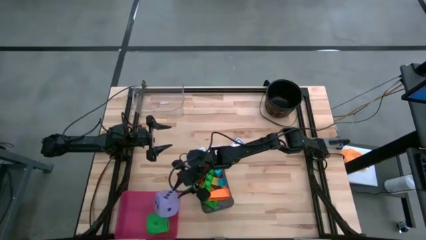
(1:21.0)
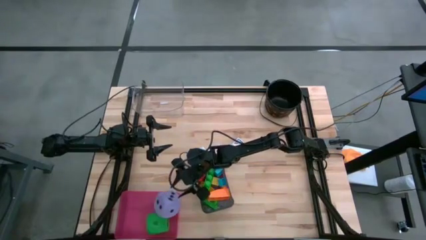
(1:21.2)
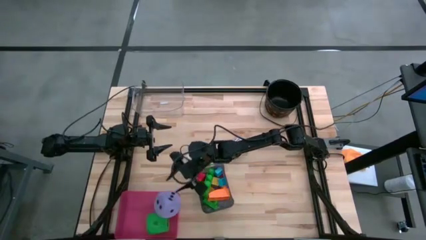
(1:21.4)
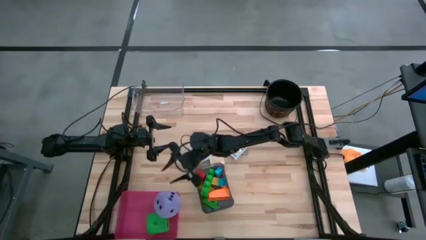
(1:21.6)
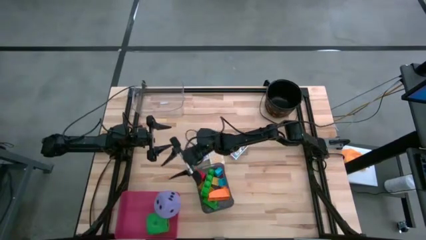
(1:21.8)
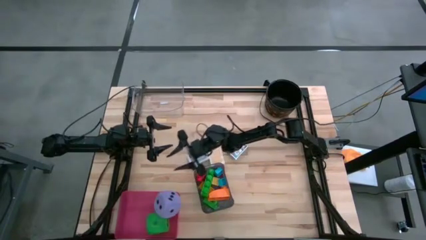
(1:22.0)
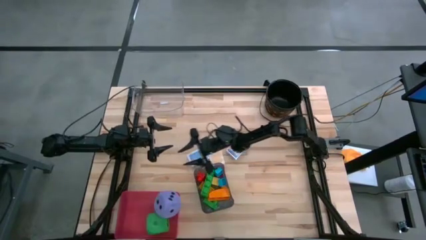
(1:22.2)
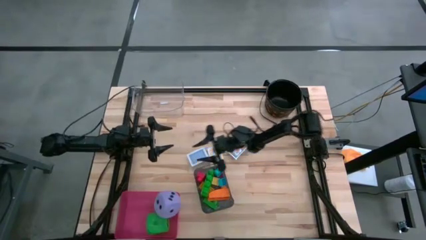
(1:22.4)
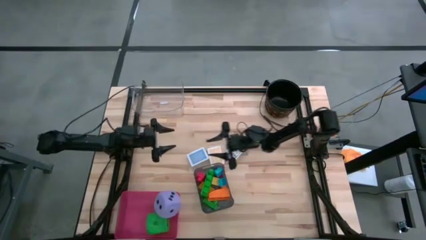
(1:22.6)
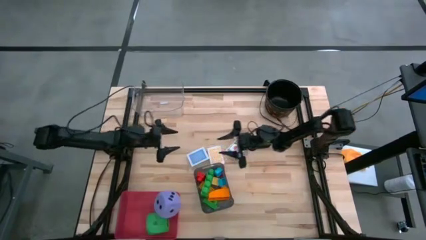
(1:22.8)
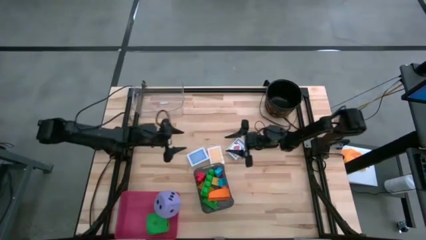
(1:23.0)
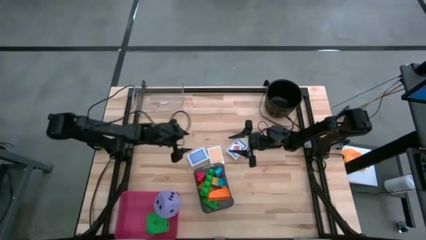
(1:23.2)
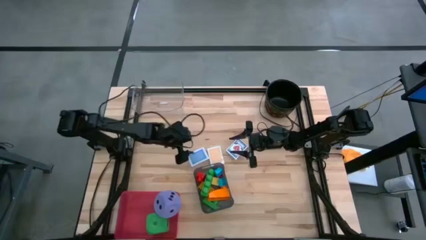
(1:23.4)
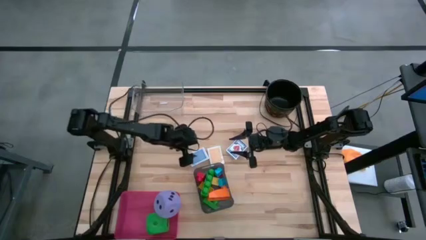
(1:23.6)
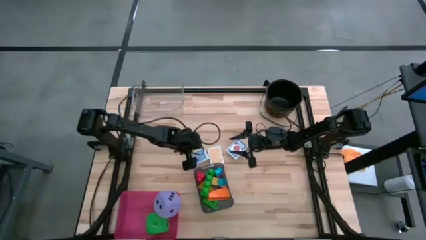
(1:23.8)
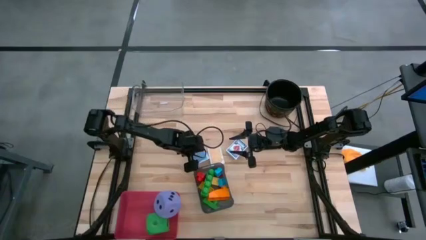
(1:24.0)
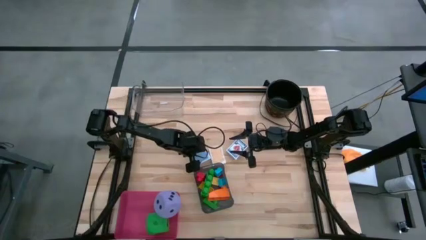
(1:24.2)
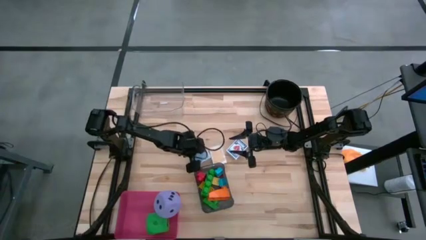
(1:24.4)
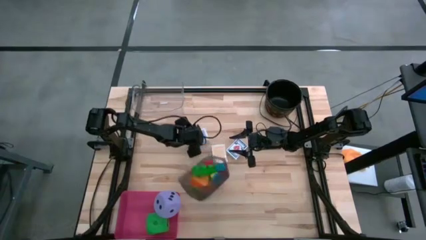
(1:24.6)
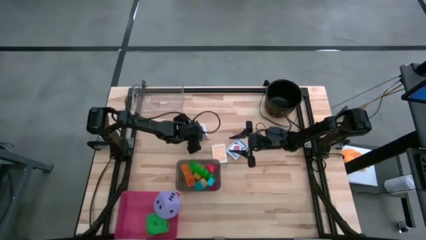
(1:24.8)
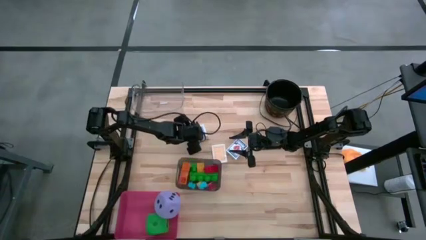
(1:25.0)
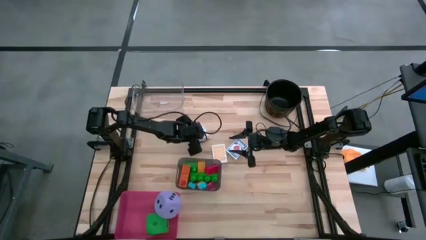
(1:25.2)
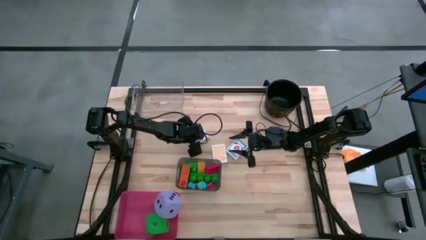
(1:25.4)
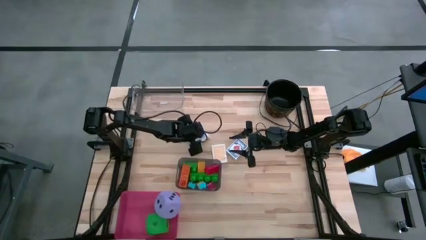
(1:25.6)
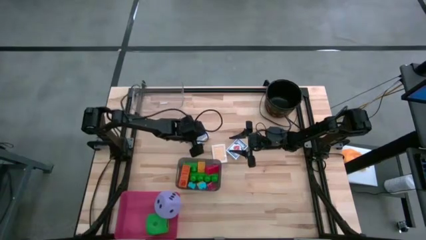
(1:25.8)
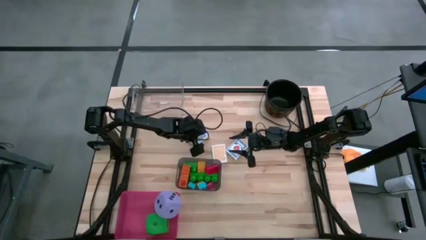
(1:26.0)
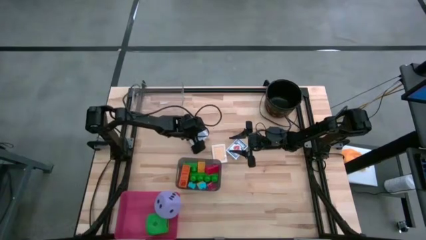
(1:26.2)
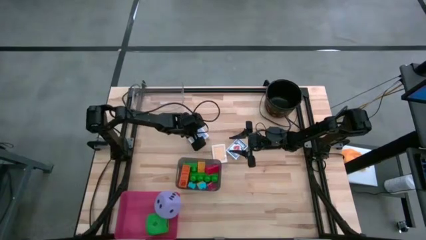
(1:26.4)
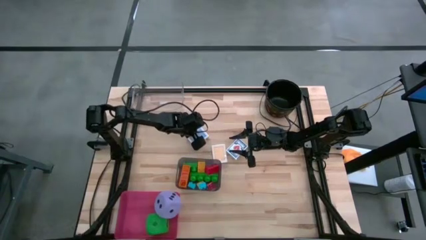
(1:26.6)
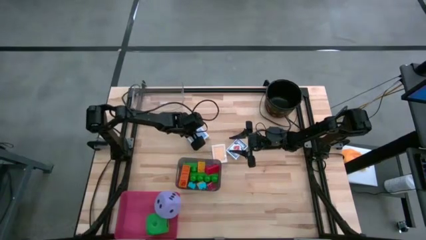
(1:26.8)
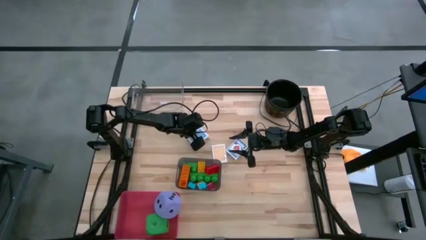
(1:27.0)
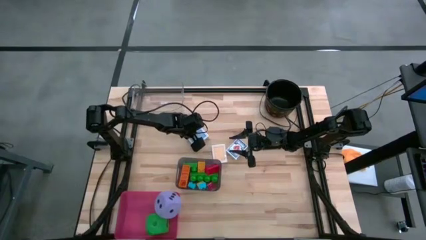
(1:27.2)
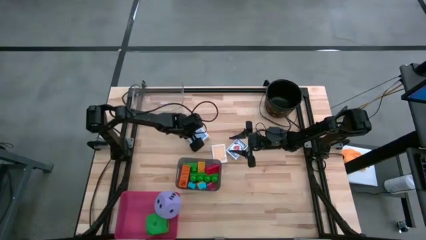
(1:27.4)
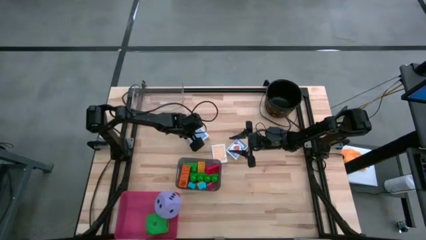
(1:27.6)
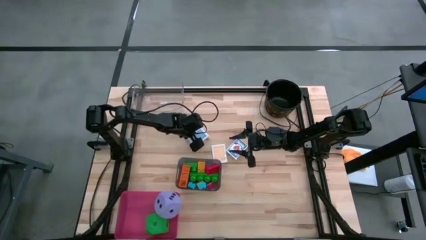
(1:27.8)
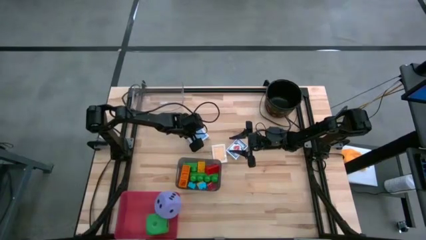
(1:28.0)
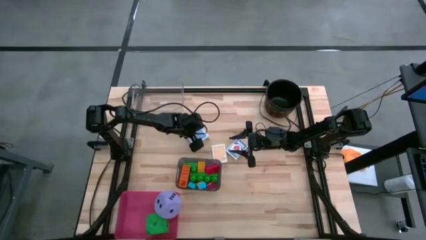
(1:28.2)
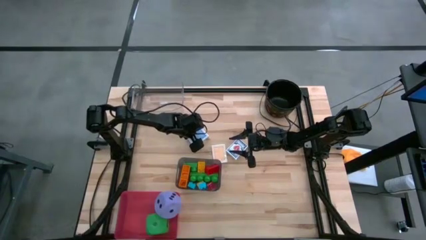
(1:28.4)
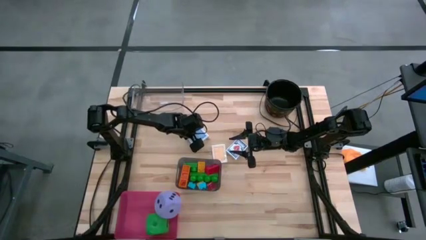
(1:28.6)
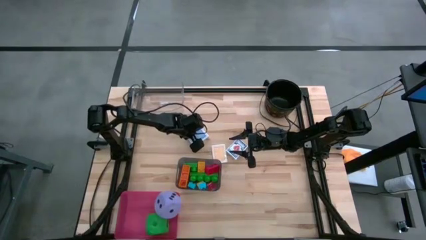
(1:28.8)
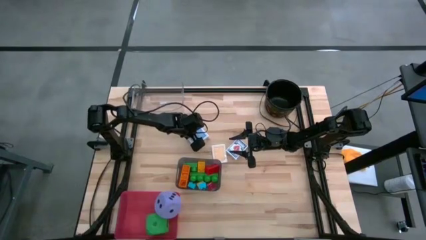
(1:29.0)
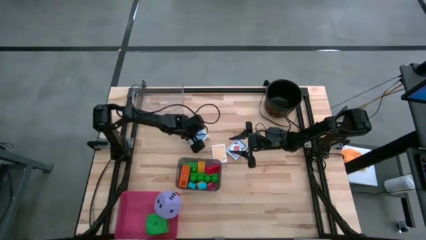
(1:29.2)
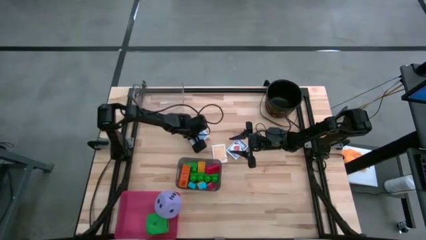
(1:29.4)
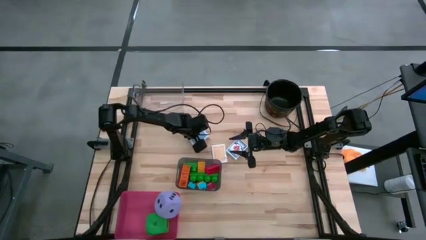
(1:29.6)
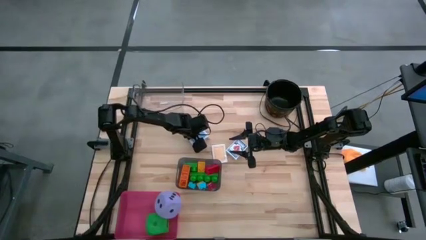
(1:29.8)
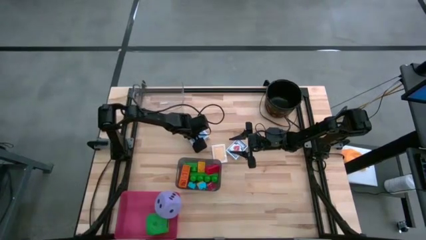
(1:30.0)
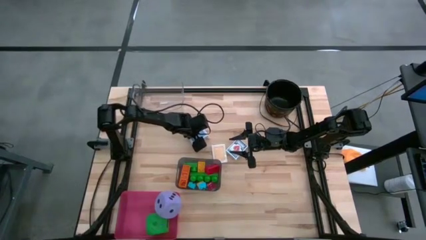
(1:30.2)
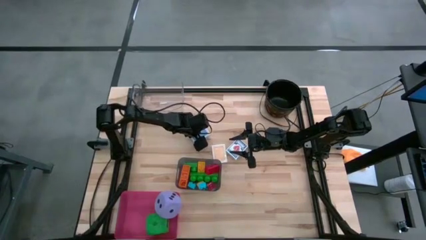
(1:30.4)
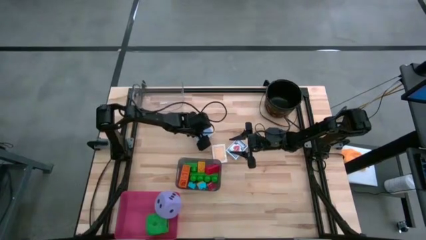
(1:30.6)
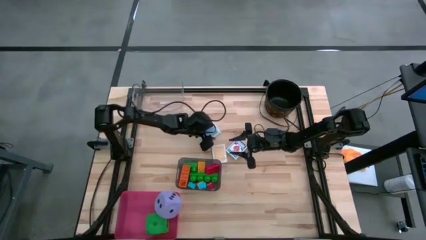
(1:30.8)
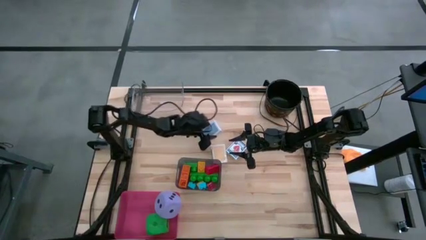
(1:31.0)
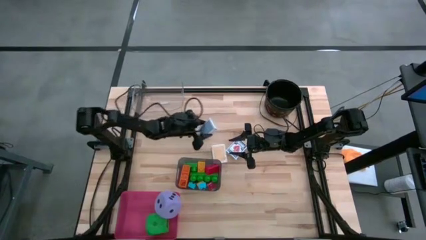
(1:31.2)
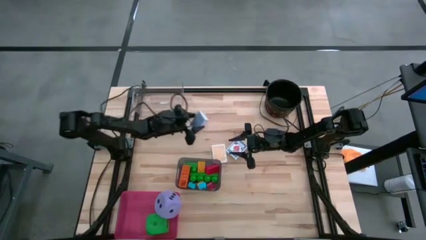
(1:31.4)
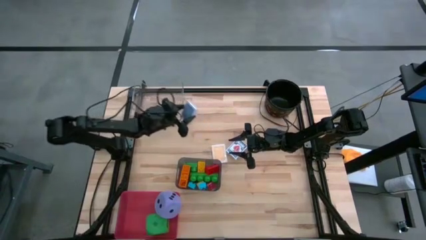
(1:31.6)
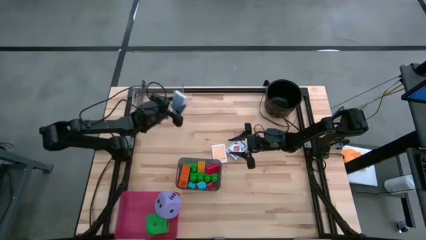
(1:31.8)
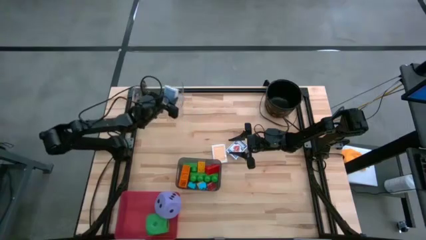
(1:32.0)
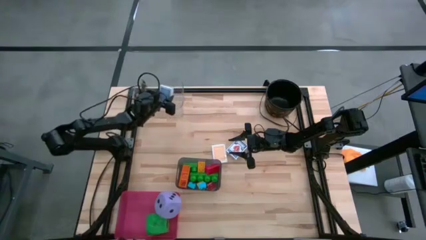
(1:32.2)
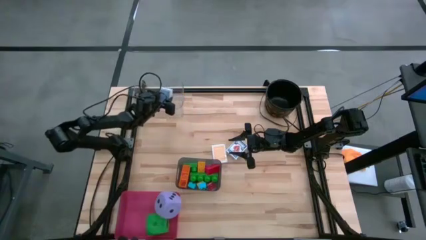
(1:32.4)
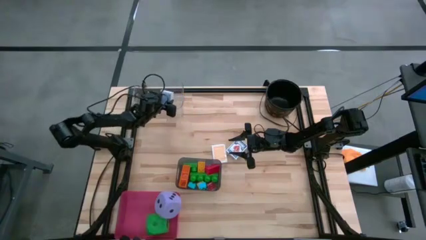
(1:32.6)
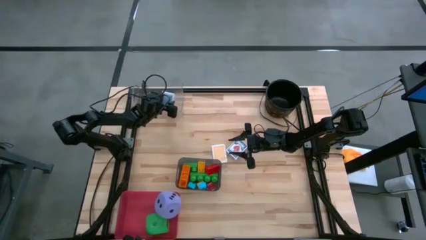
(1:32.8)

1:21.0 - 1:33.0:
Task: Pick & Place Toys
Put the blue playing card into the transparent bin

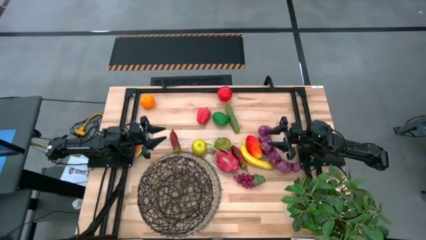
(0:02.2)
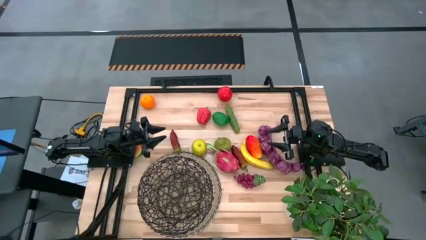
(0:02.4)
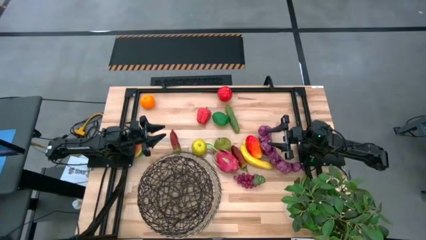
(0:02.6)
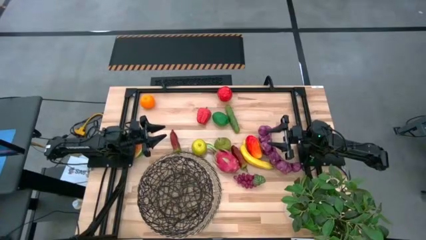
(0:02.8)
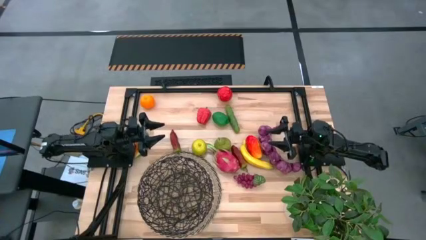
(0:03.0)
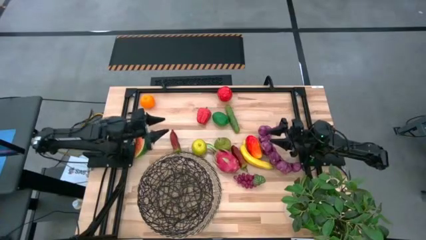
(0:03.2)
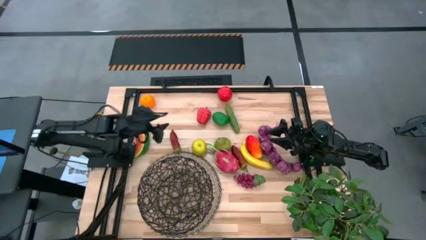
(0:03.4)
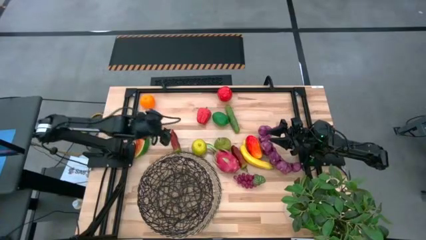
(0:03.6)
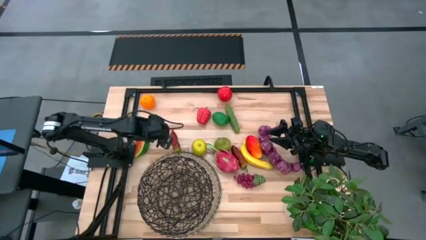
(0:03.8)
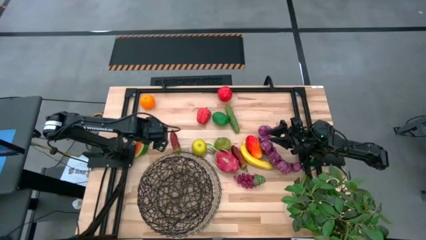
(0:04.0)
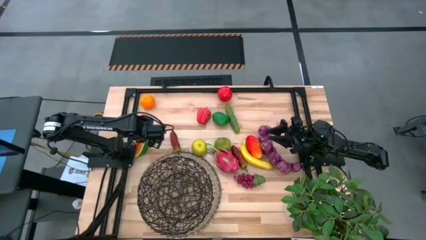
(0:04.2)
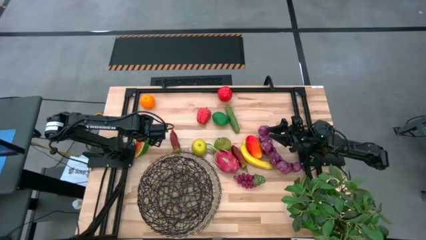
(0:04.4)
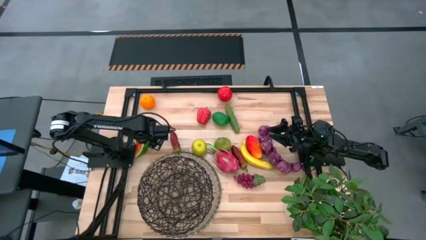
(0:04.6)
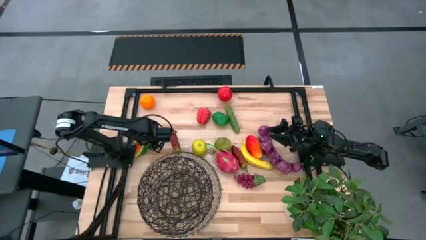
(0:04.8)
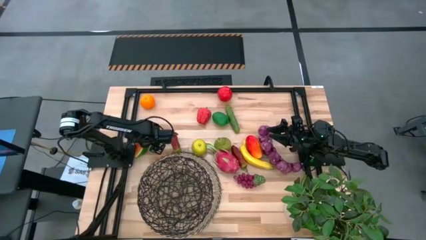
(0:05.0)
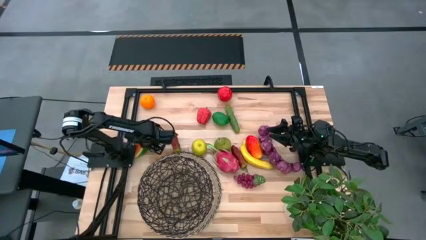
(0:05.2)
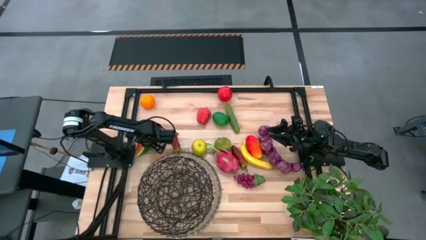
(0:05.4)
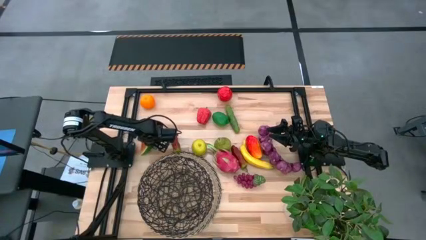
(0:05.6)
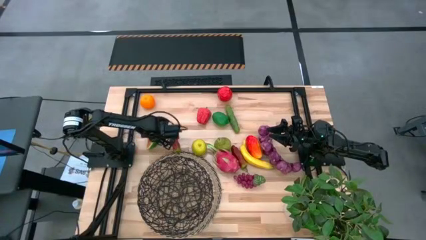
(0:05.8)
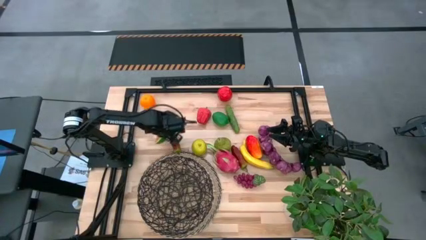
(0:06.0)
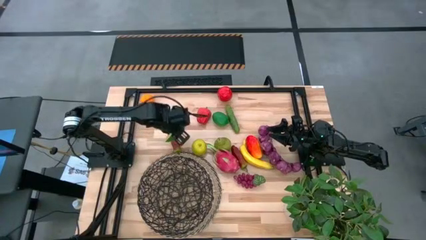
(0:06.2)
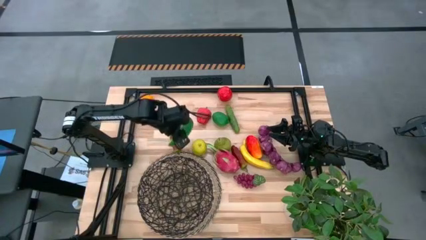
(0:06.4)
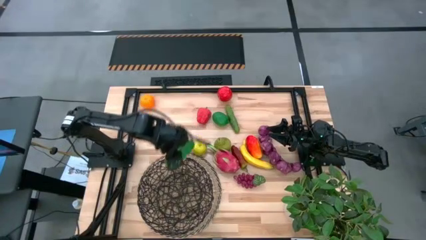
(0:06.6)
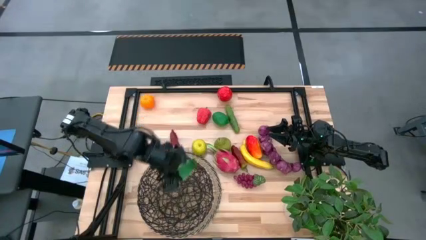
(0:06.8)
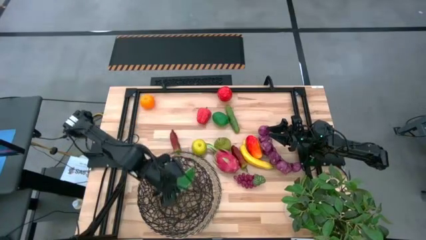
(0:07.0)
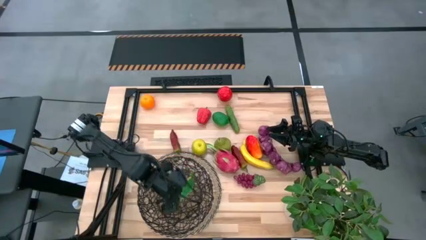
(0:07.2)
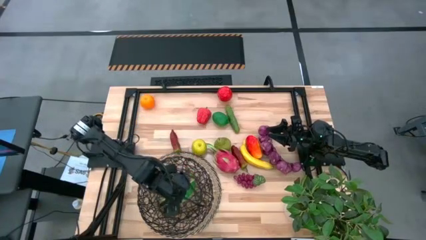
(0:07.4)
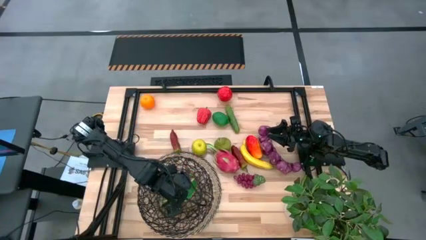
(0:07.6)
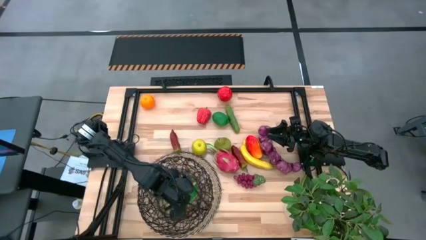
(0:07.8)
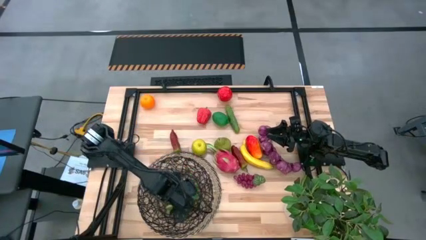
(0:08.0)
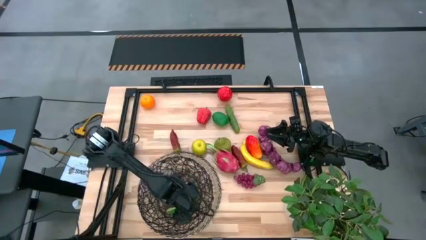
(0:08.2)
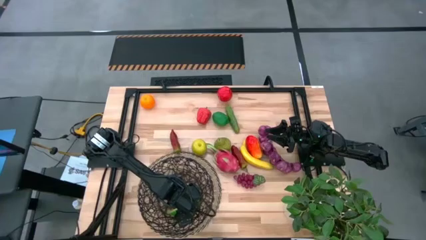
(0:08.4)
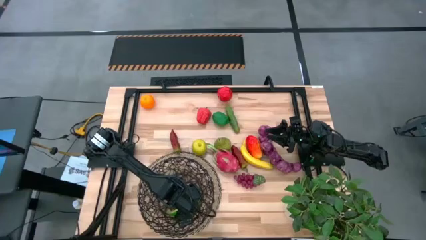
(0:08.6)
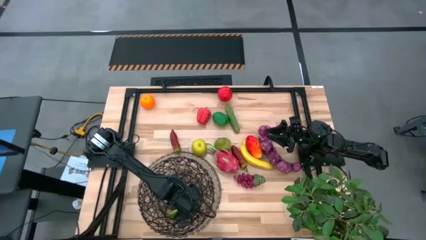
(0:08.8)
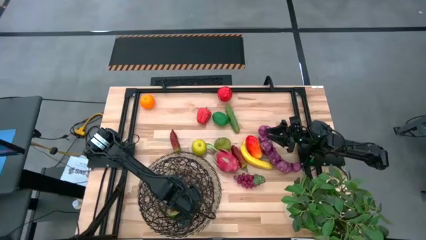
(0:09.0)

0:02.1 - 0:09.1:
Task: Build produce basket
Put the watermelon into the woven basket
